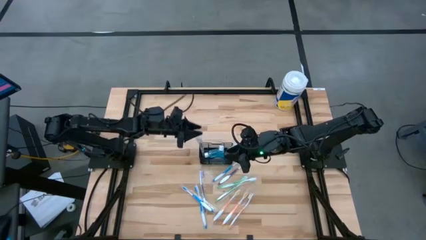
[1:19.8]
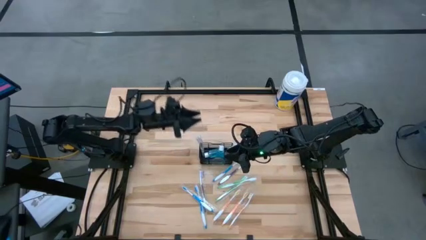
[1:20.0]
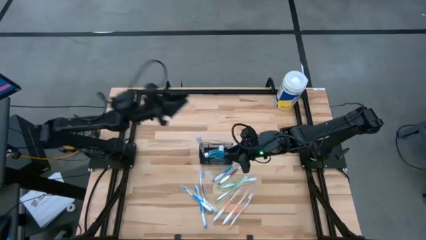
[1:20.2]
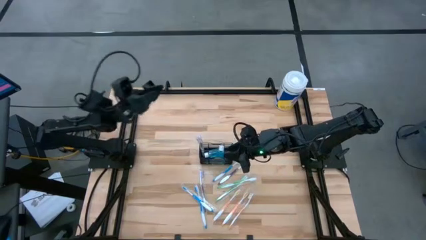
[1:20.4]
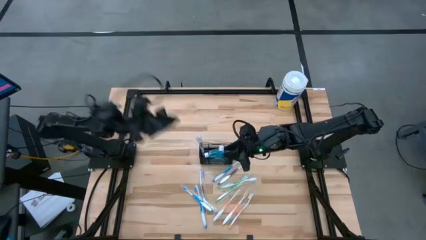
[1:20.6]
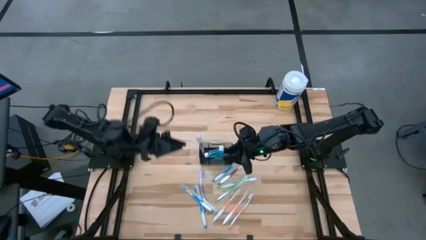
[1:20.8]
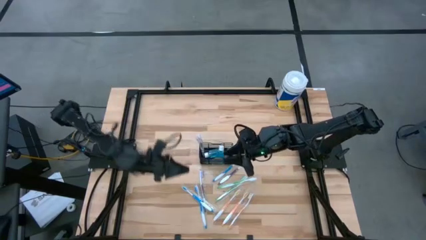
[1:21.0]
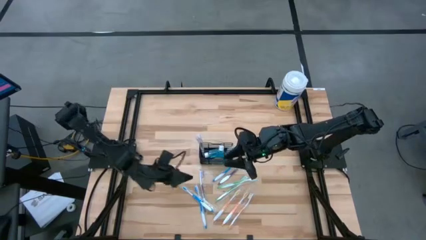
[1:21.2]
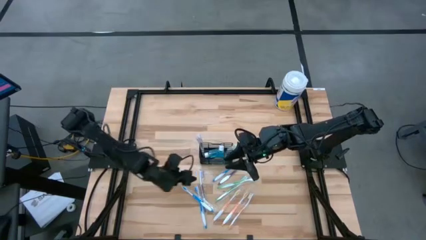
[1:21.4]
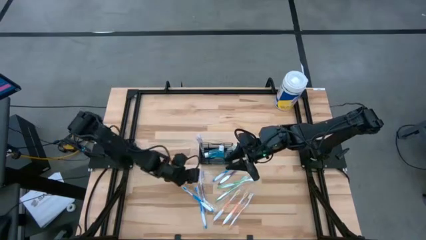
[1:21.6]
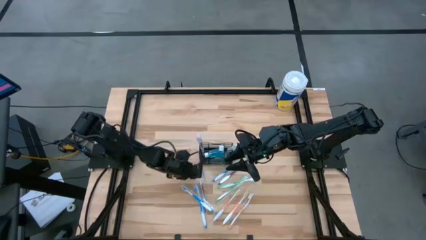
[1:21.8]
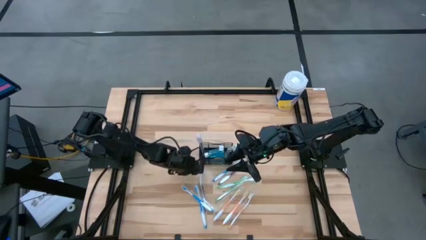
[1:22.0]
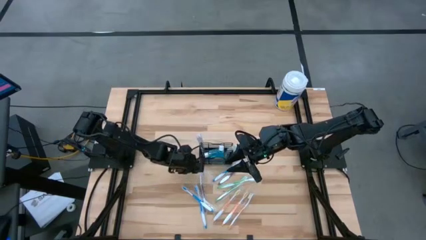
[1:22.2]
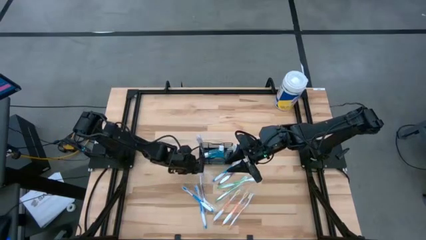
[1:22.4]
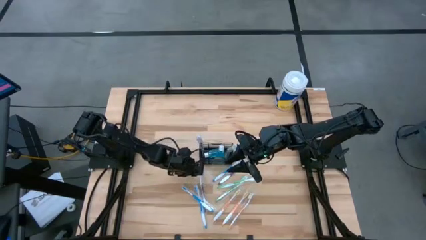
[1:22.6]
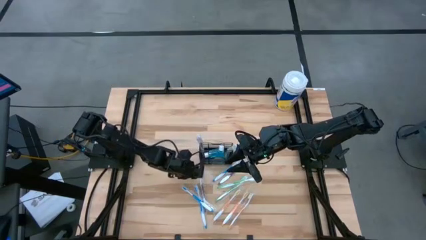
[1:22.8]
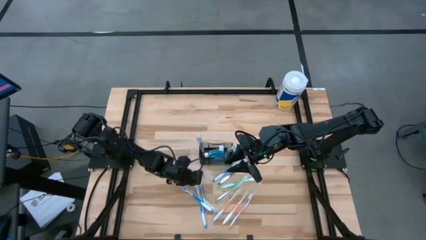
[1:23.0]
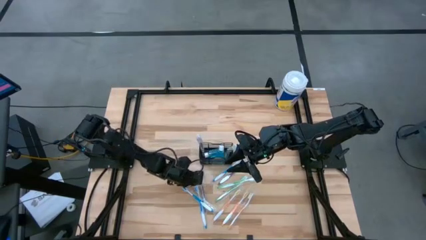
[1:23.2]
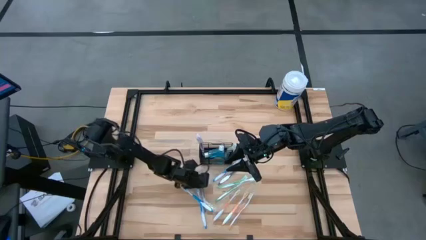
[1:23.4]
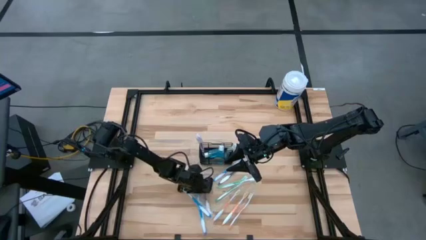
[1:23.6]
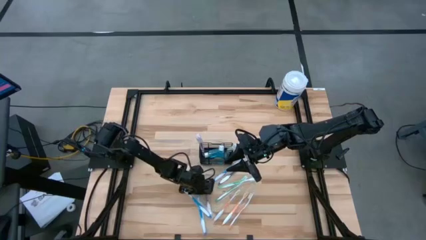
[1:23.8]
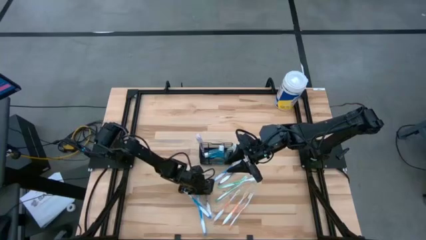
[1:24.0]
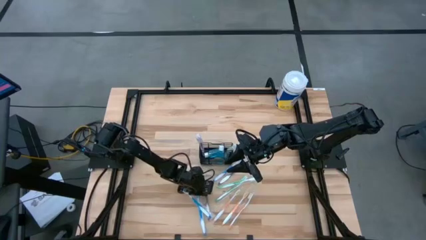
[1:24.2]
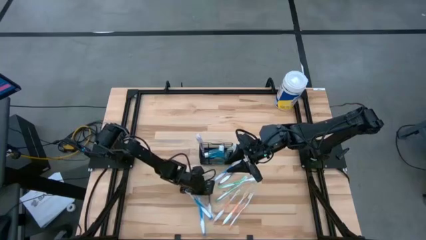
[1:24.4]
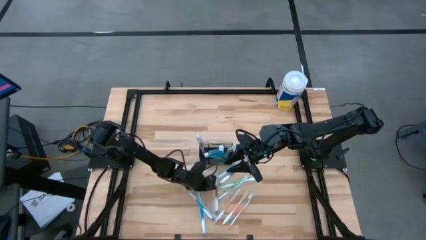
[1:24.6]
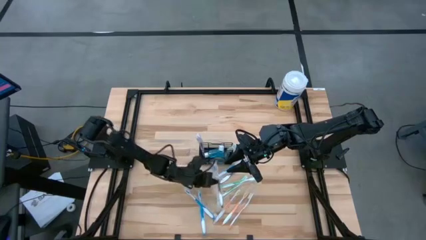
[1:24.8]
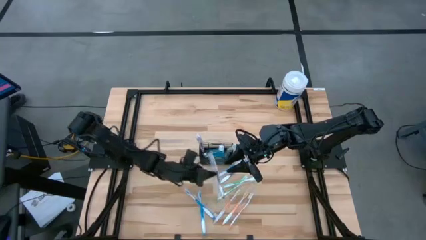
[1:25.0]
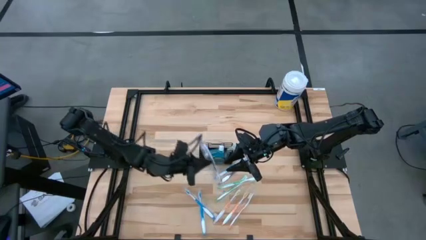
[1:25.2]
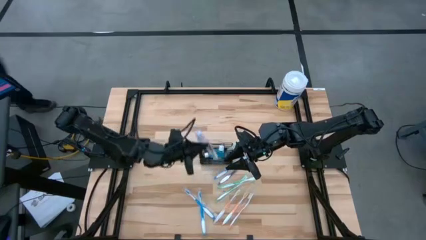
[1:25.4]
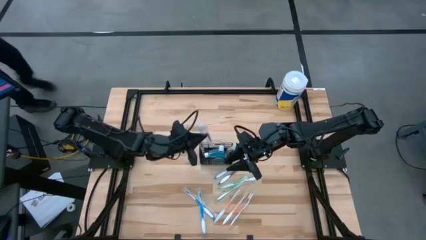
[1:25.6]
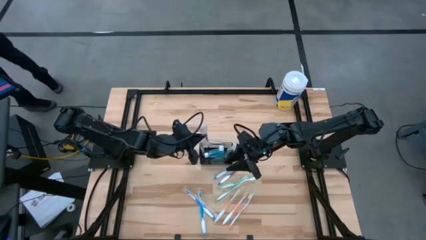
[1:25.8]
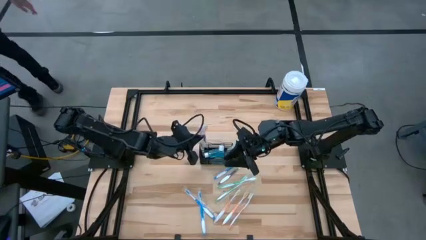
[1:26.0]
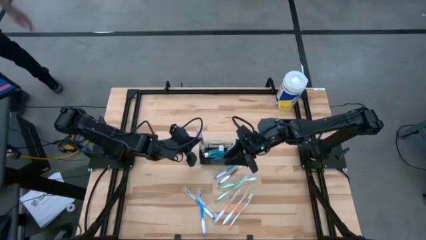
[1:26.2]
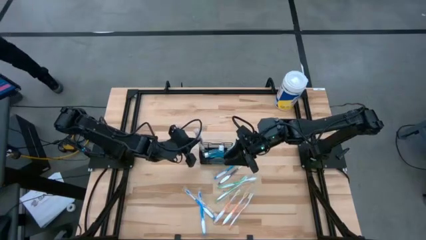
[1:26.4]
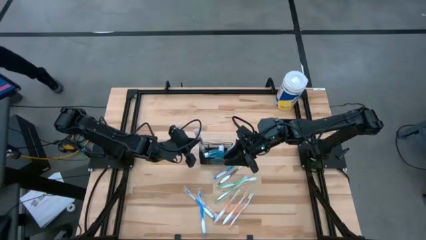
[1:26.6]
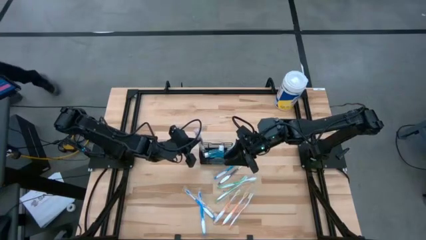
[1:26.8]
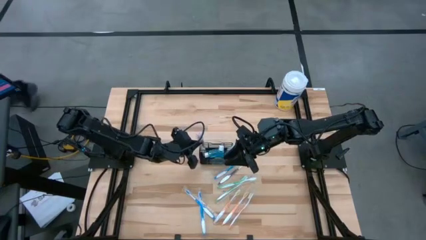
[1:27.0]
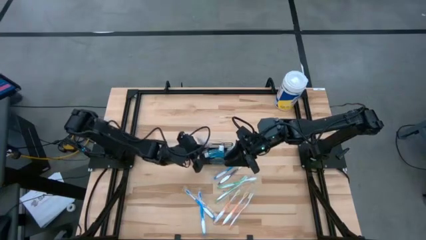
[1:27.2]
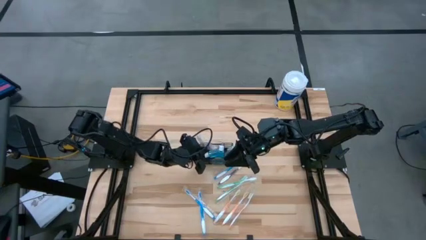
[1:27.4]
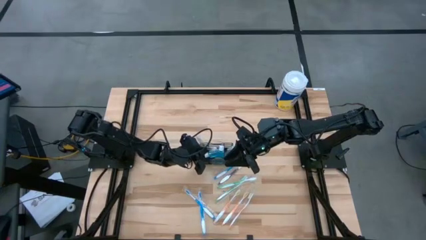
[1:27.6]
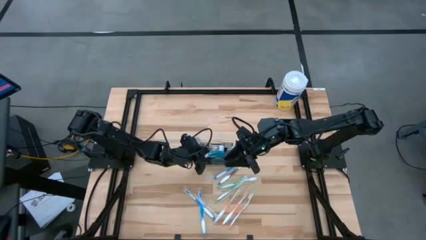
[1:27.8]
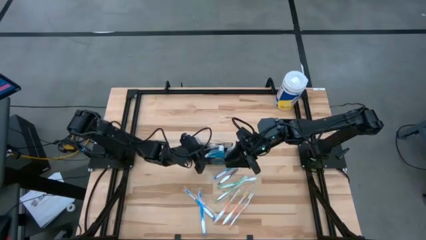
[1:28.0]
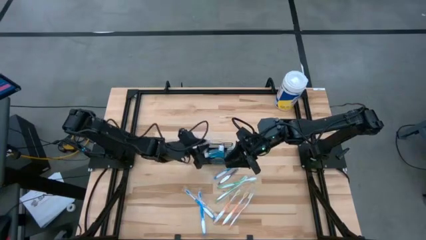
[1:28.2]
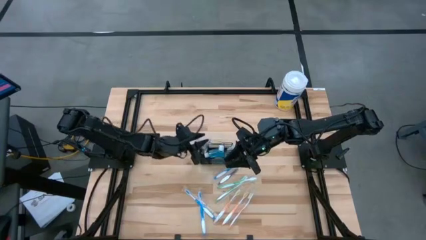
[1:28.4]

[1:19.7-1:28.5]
Task: Pick & Place toothbrushing station
Put the purple toothbrush into the black wire organizer

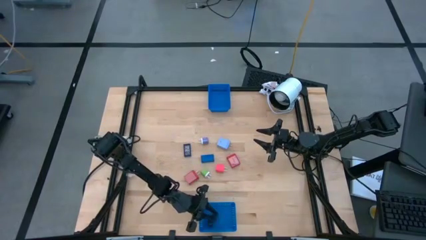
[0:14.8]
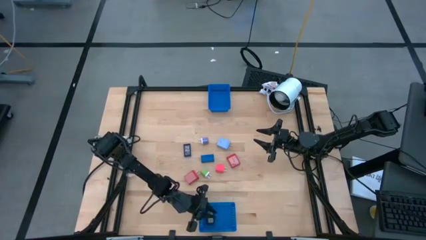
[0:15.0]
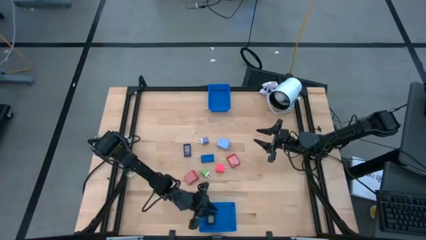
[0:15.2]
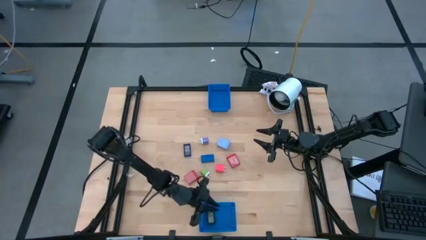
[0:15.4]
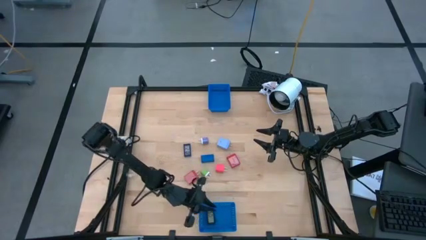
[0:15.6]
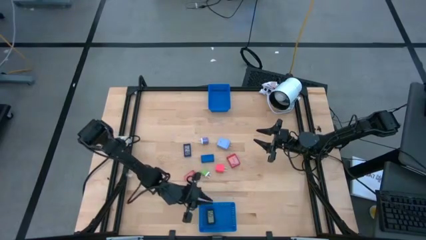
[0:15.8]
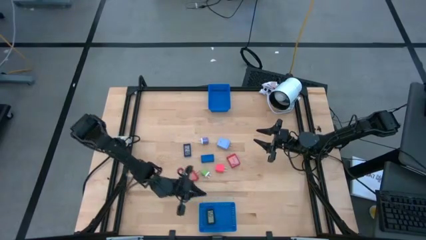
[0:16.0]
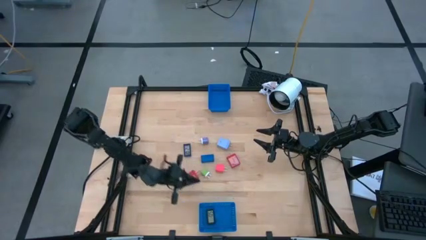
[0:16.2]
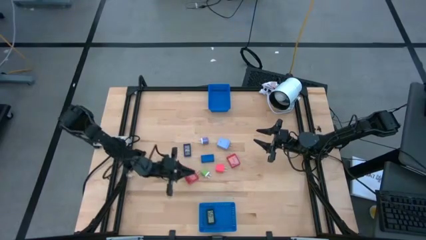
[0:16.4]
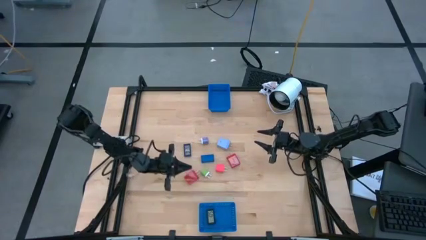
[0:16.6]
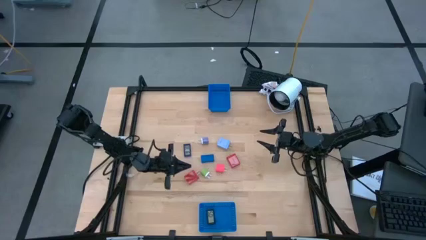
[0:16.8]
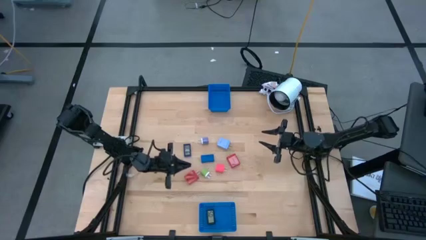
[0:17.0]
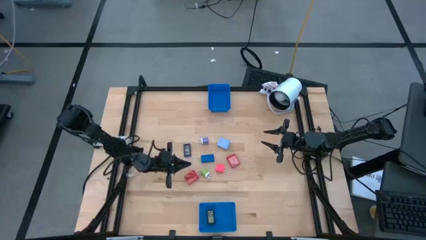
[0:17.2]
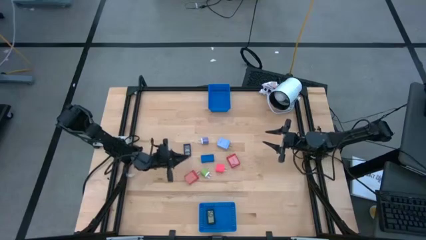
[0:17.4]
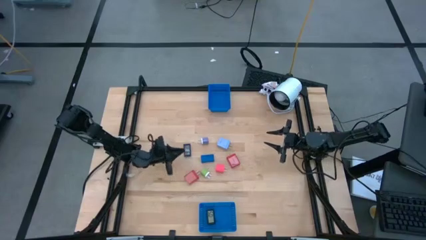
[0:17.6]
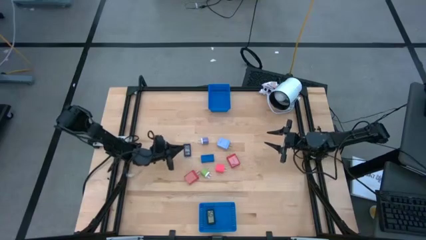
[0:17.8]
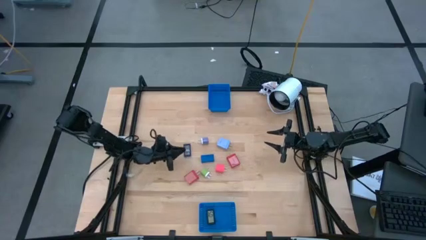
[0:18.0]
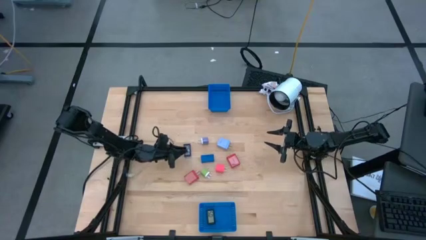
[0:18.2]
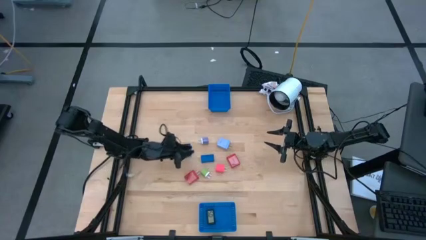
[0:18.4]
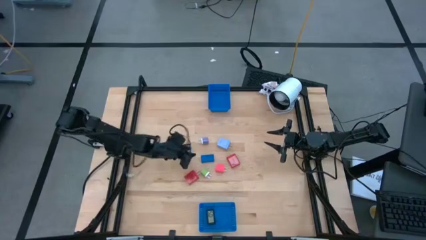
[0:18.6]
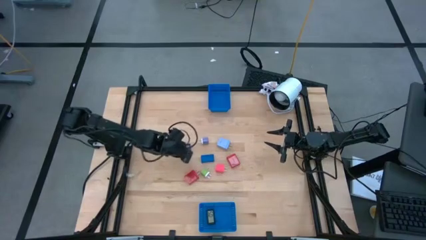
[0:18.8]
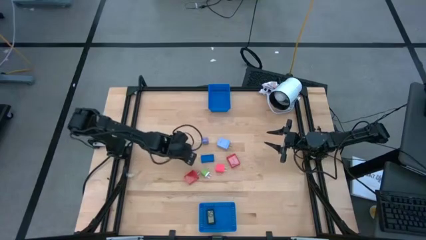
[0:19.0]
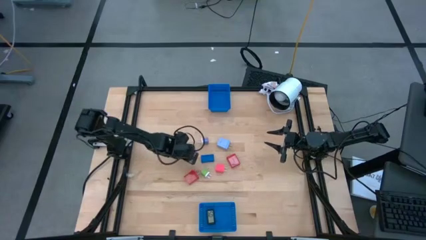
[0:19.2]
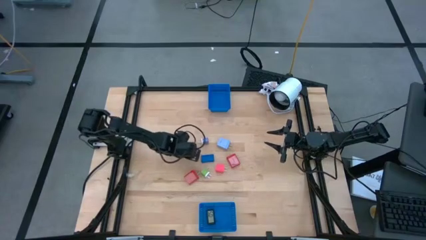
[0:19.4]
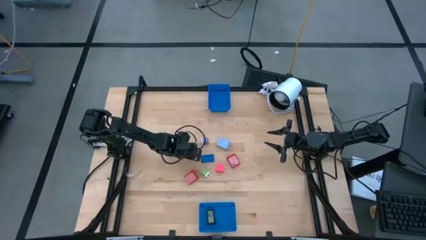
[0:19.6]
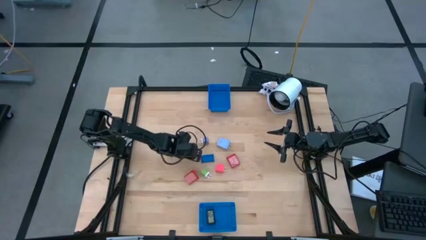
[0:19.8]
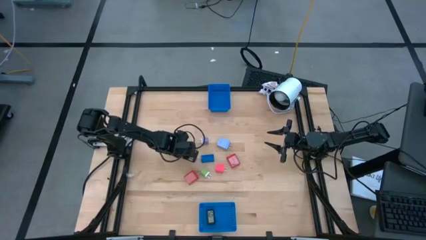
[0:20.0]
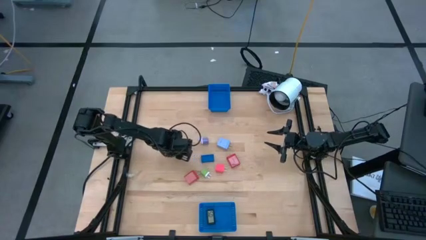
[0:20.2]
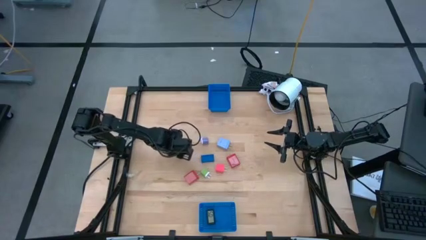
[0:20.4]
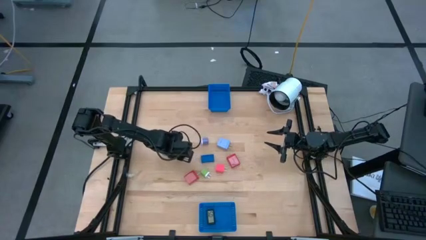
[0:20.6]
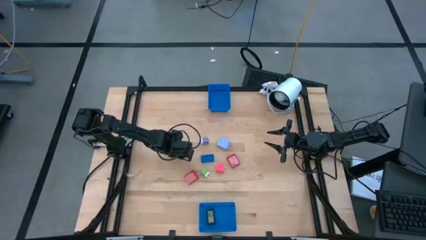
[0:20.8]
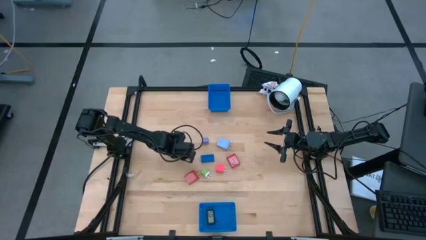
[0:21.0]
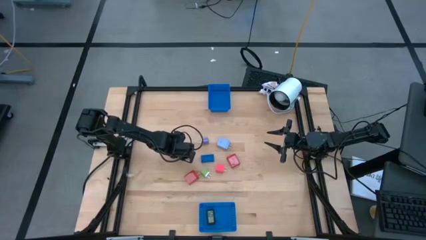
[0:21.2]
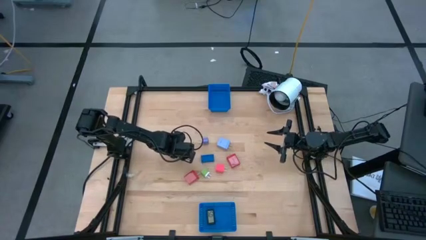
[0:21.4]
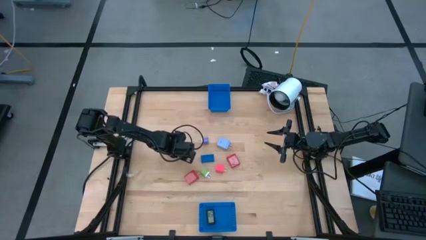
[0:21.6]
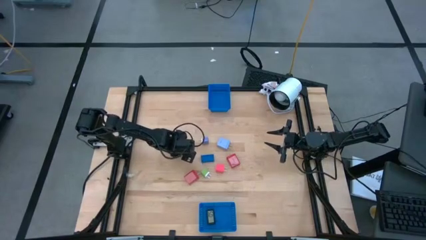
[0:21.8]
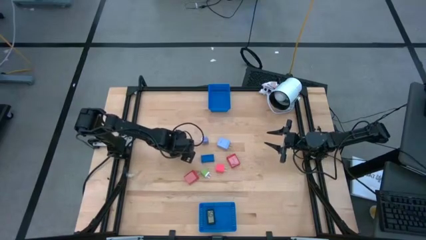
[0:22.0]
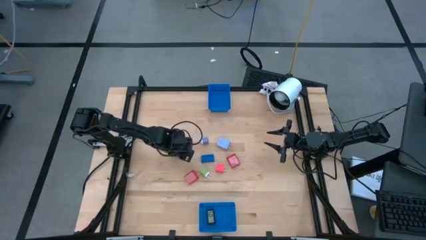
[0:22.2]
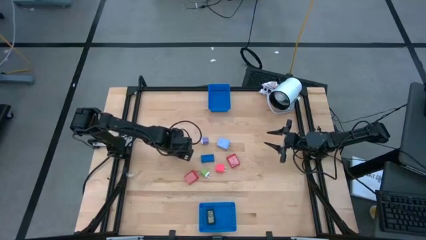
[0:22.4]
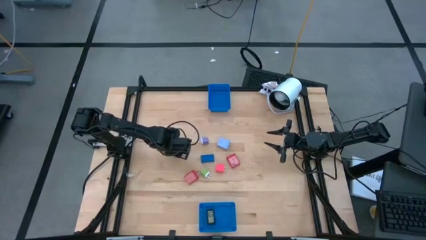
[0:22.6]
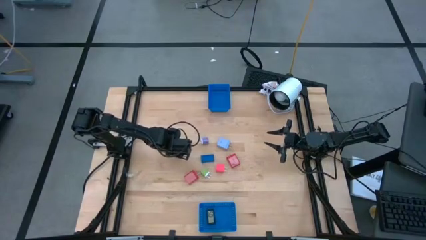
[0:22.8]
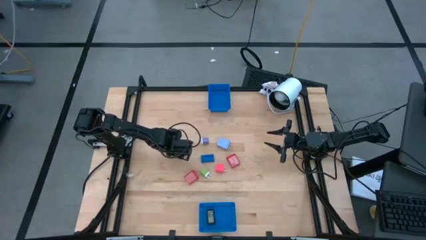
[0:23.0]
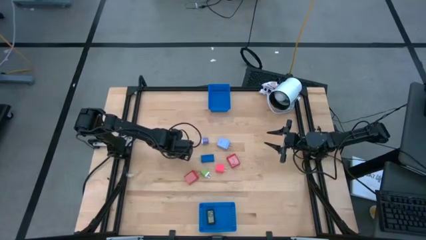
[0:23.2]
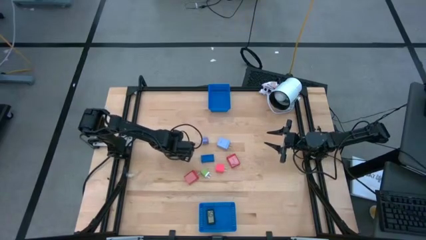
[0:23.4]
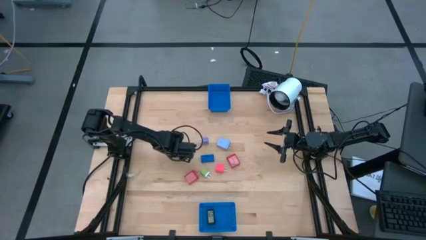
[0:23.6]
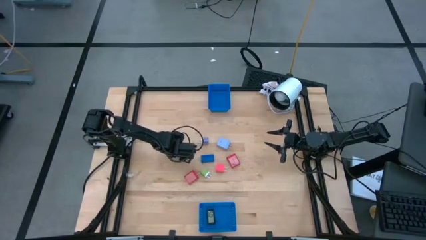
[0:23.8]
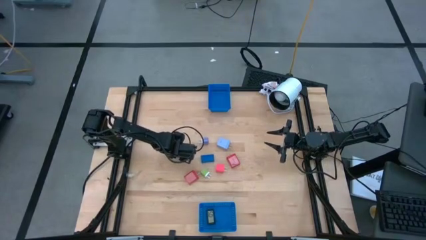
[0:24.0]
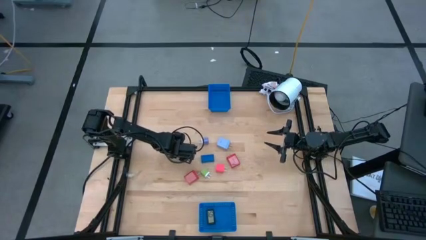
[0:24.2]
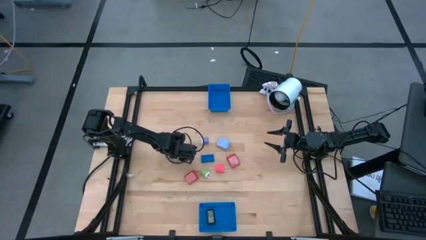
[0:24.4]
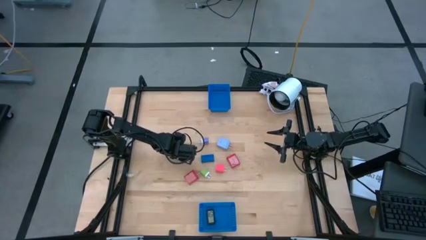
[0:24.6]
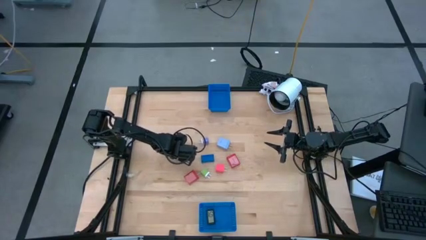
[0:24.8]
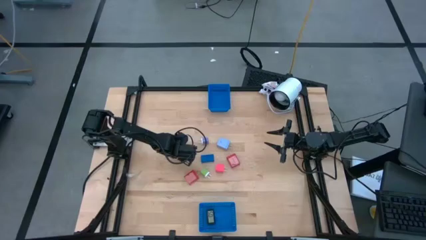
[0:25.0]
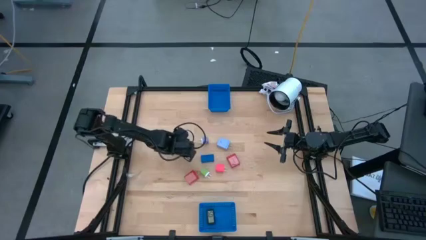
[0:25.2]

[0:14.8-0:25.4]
Task: Pick & Place Office items
Put the purple digital timer into the bottom blue bin
